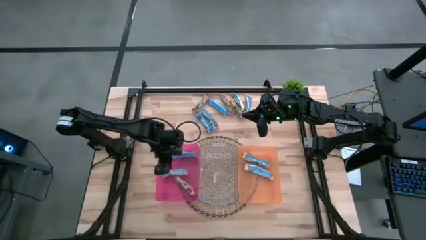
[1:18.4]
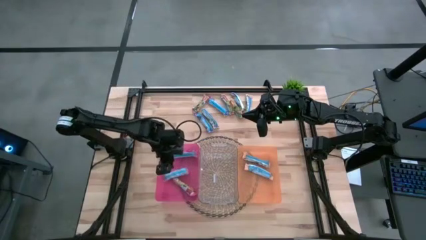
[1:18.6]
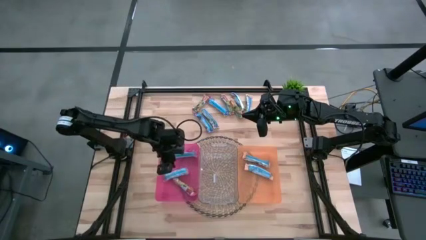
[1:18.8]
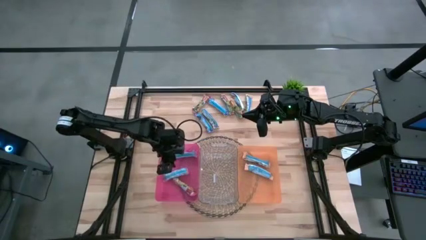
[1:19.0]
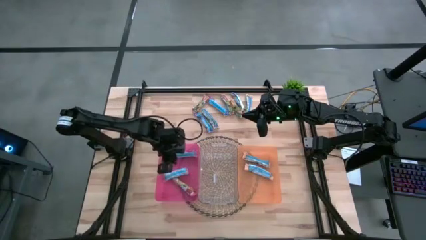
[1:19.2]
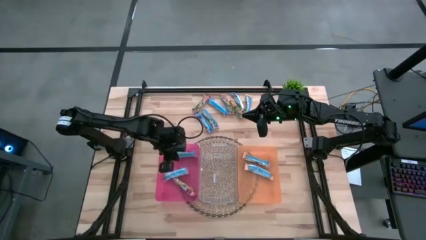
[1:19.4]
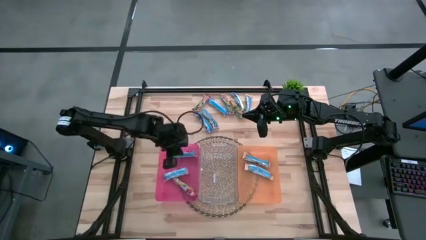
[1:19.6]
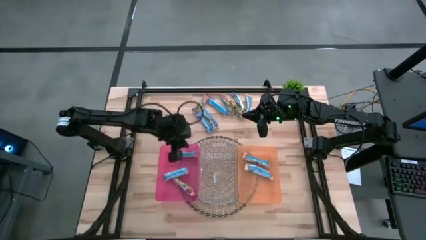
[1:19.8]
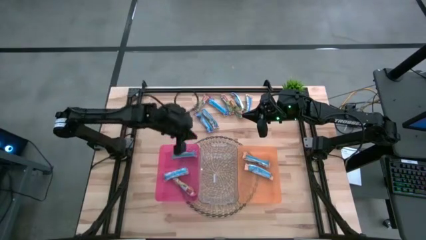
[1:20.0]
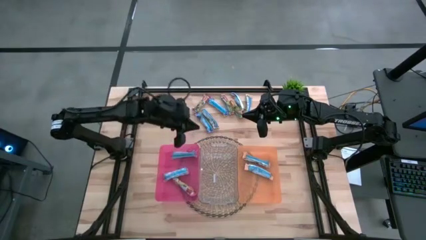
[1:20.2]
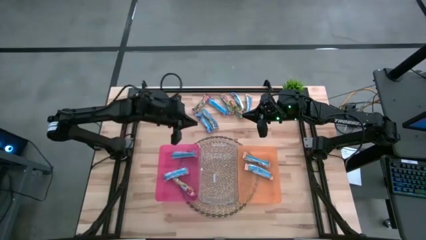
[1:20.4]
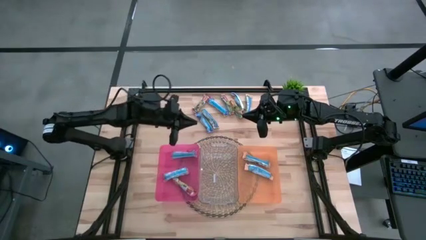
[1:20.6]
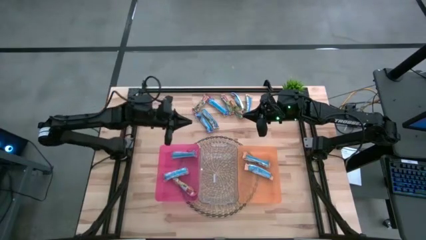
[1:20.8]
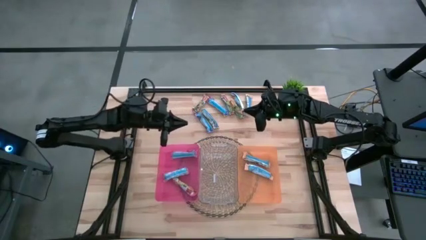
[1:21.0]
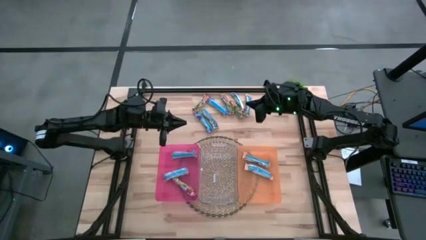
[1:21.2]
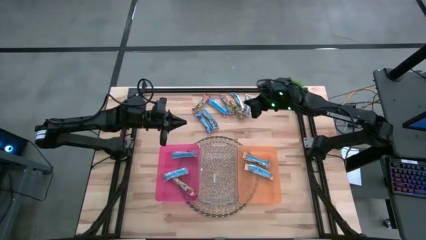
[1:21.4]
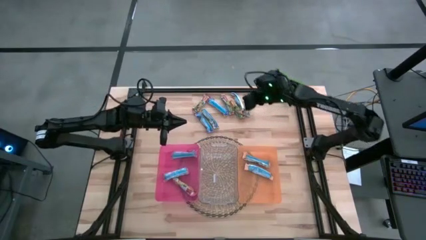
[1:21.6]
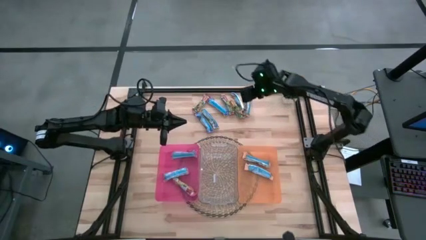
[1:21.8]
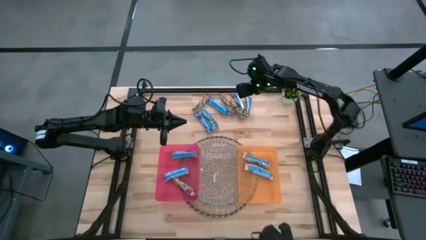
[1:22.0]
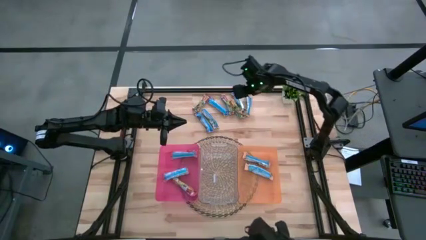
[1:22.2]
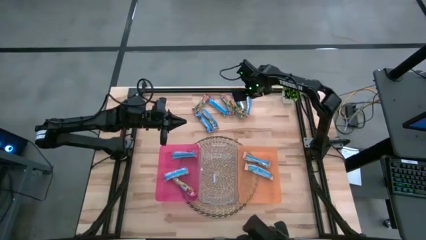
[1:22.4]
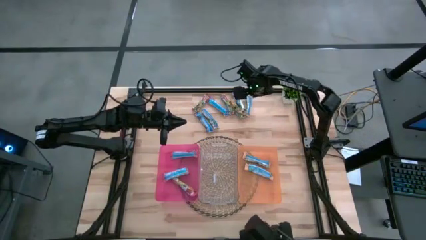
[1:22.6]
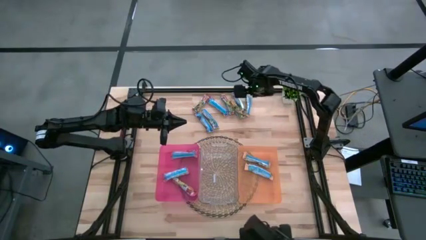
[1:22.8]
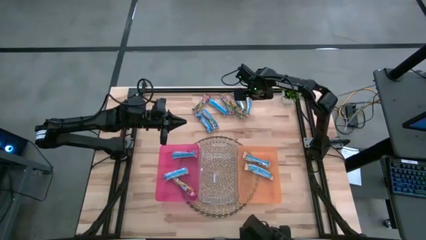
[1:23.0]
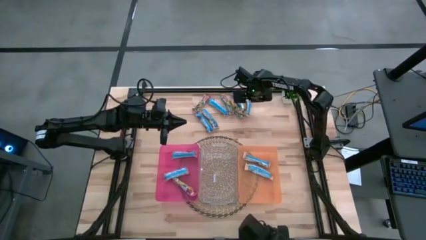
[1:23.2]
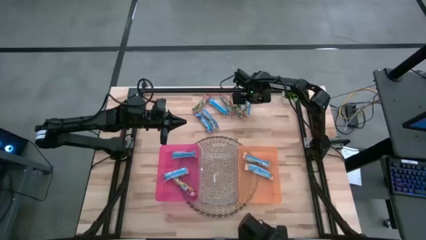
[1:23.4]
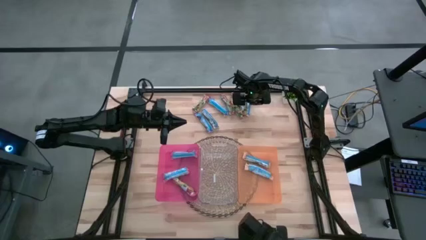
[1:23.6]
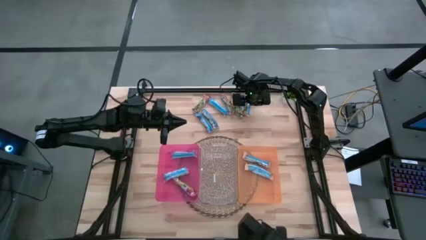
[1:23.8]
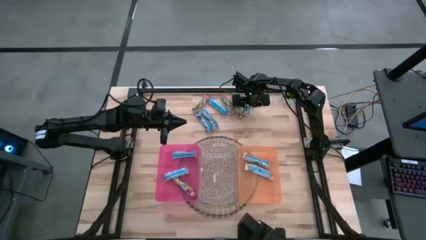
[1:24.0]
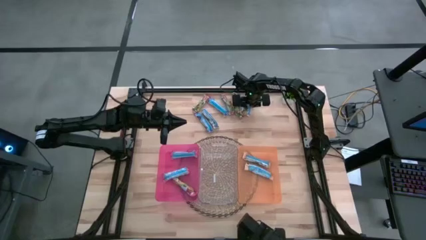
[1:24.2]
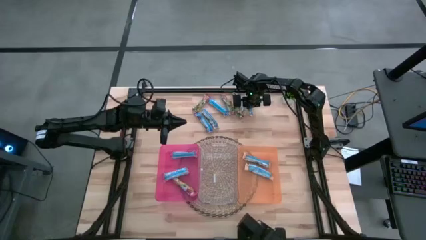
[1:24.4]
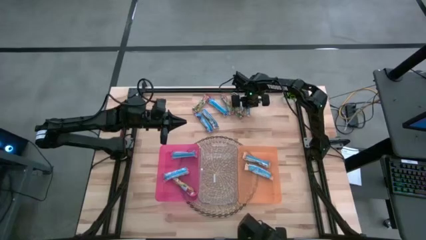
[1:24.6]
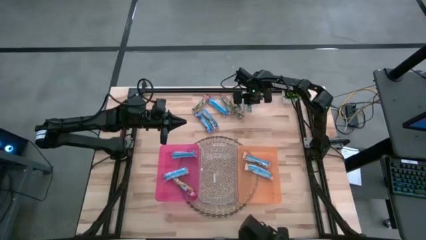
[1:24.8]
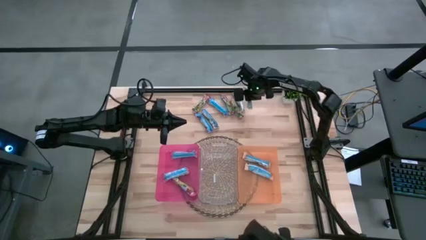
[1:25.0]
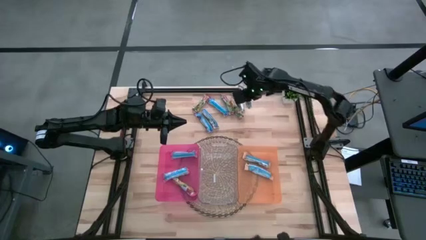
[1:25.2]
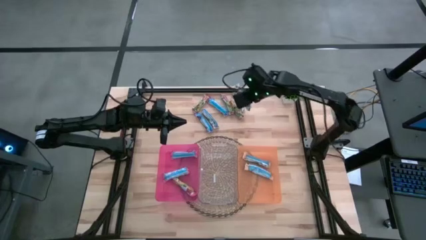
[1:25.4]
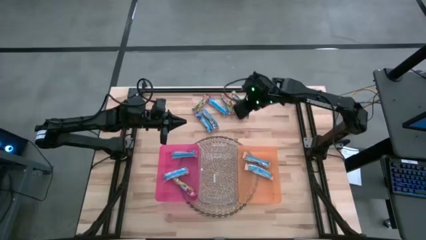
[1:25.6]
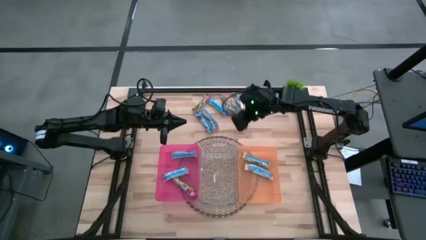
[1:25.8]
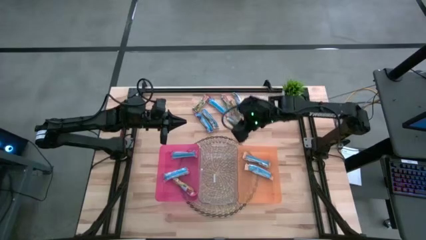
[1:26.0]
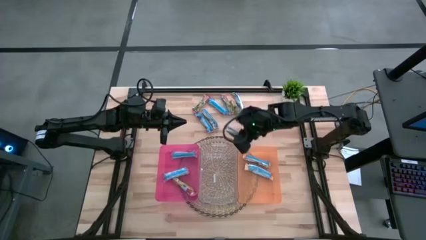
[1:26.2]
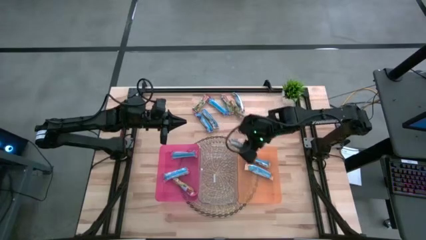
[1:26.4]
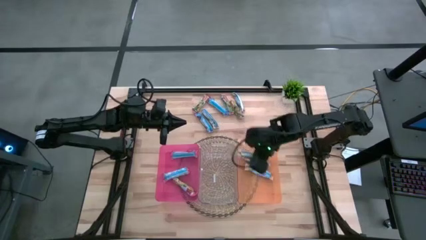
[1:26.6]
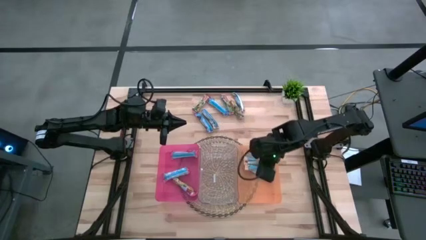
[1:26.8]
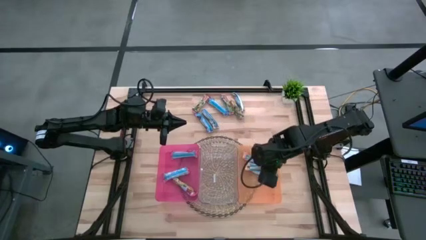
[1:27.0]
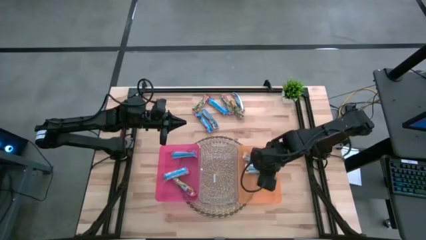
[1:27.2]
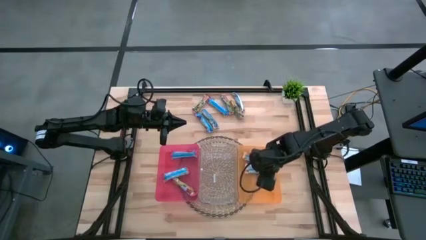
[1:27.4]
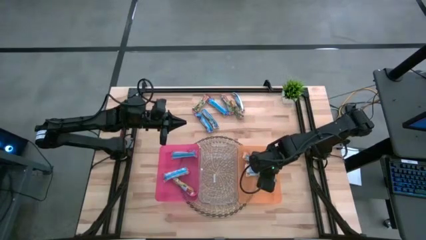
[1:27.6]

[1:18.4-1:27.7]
Task: Pick and place Granola Bars by type
Put the yellow granola bar into the orange bin
